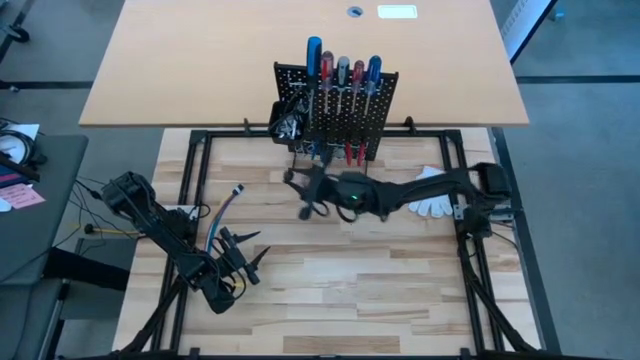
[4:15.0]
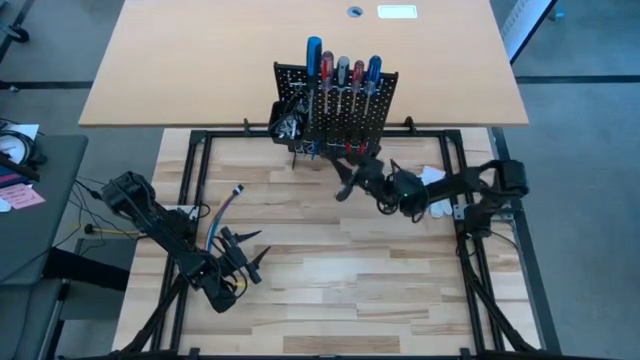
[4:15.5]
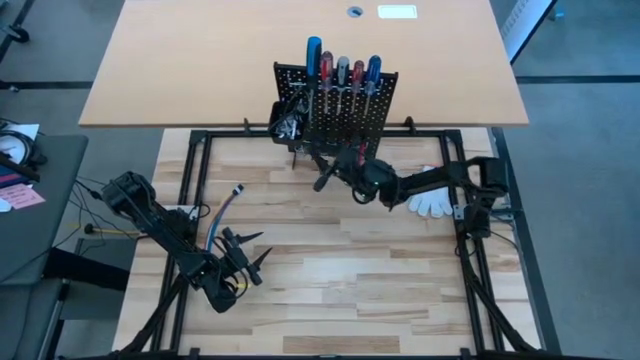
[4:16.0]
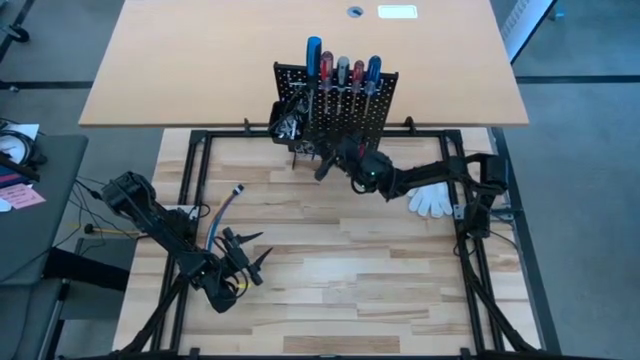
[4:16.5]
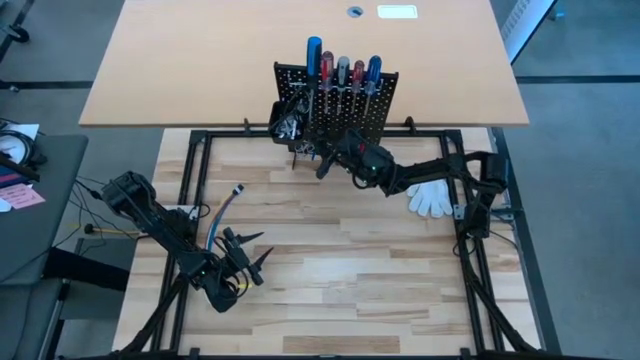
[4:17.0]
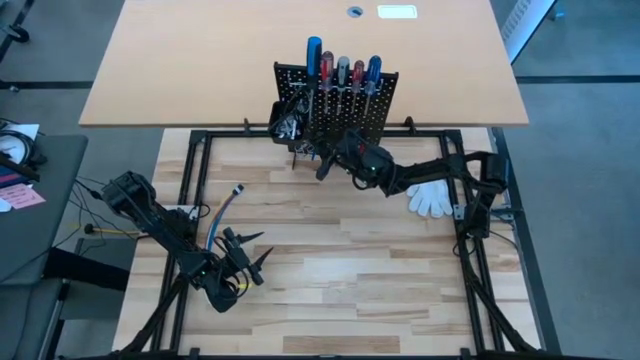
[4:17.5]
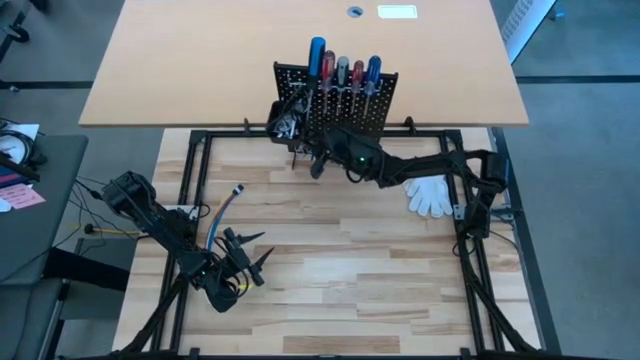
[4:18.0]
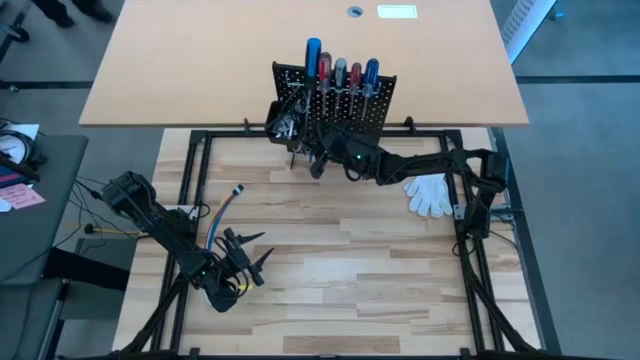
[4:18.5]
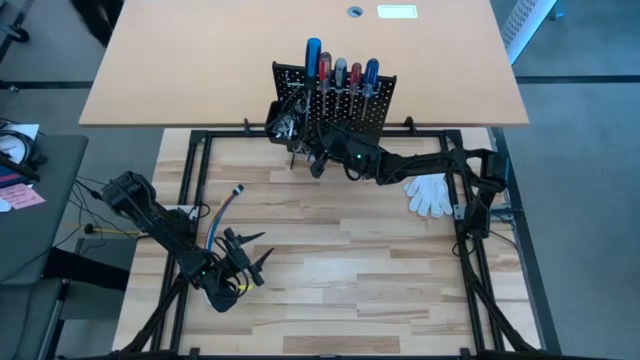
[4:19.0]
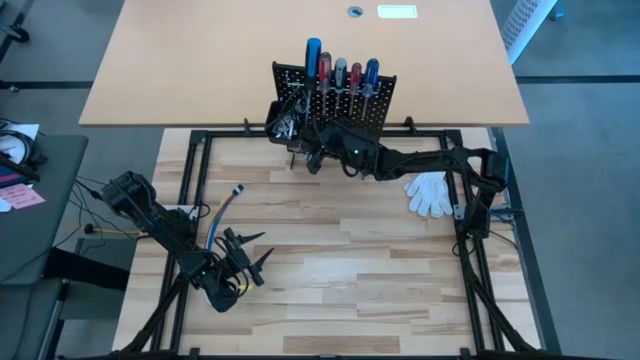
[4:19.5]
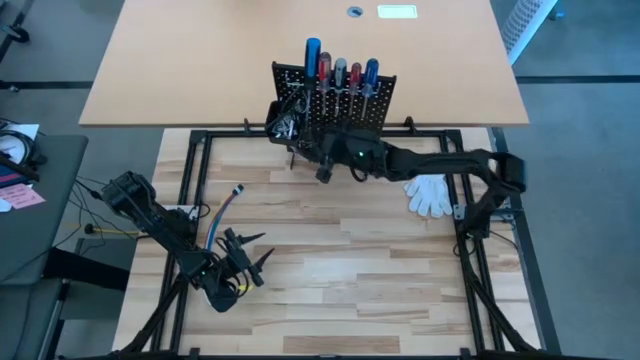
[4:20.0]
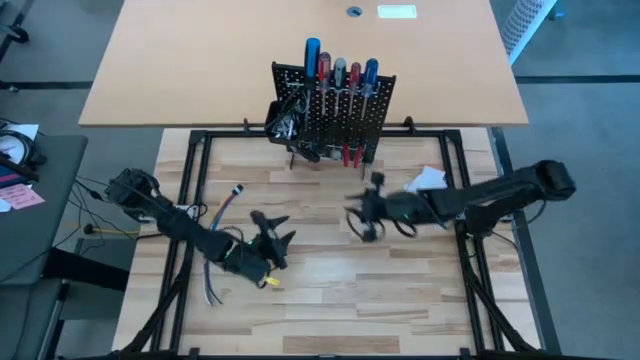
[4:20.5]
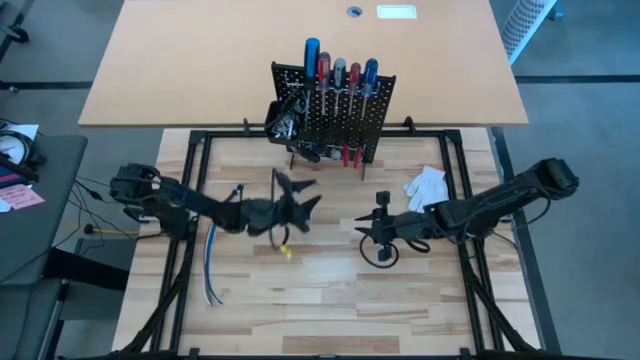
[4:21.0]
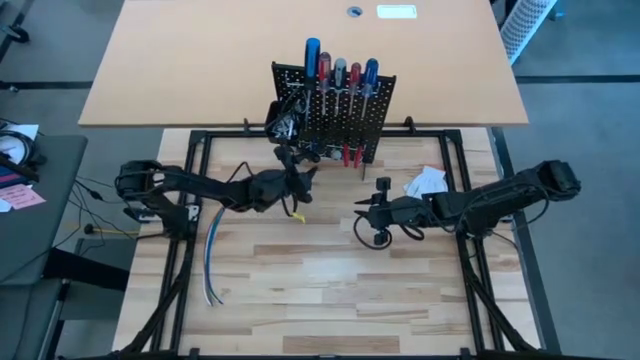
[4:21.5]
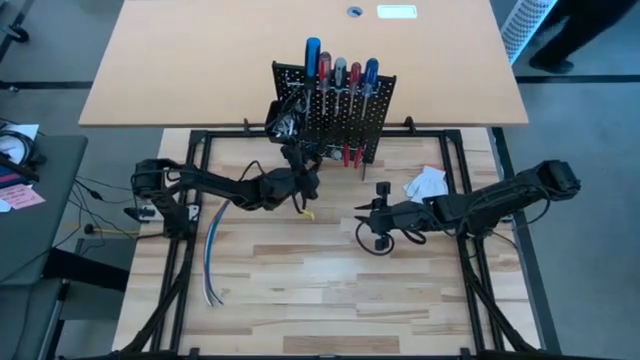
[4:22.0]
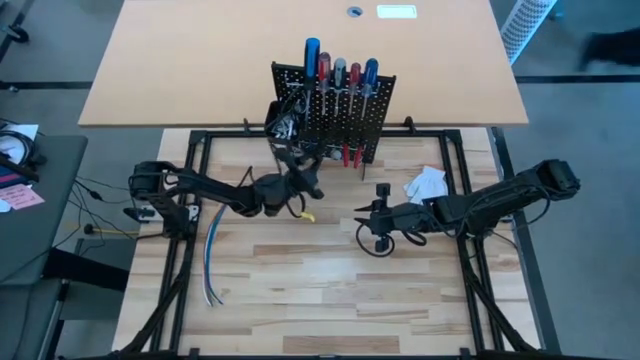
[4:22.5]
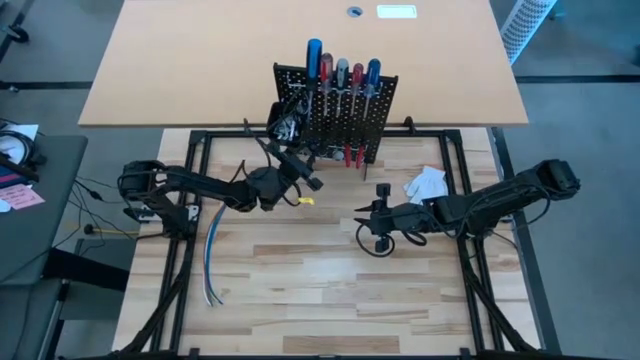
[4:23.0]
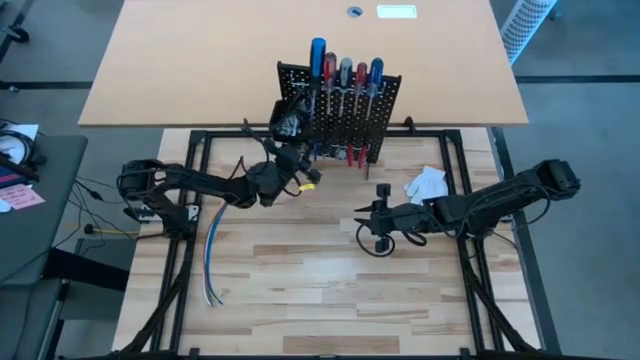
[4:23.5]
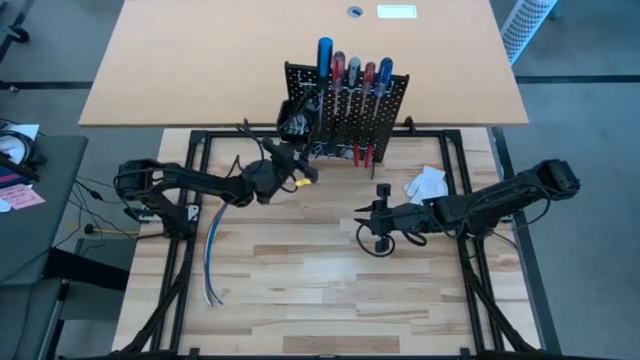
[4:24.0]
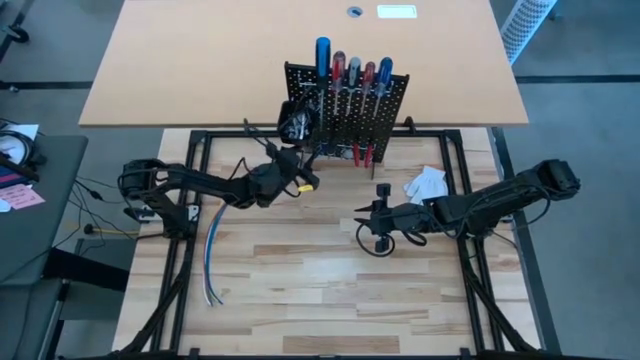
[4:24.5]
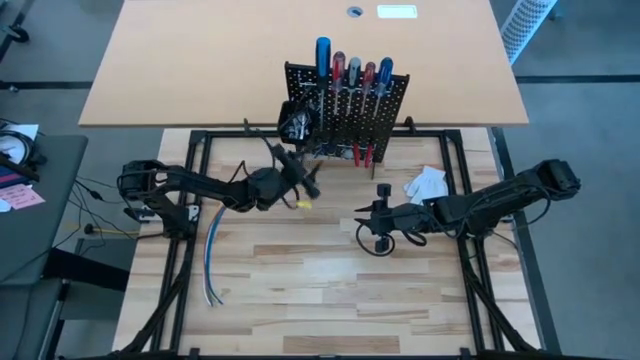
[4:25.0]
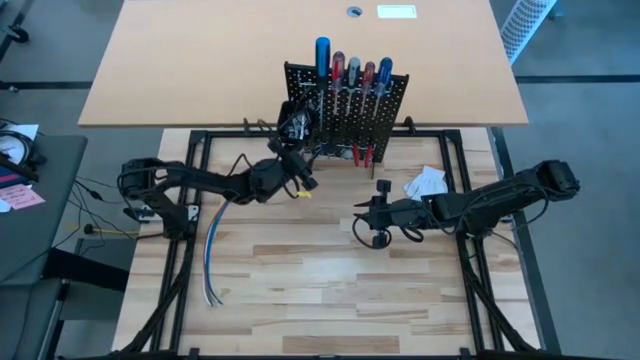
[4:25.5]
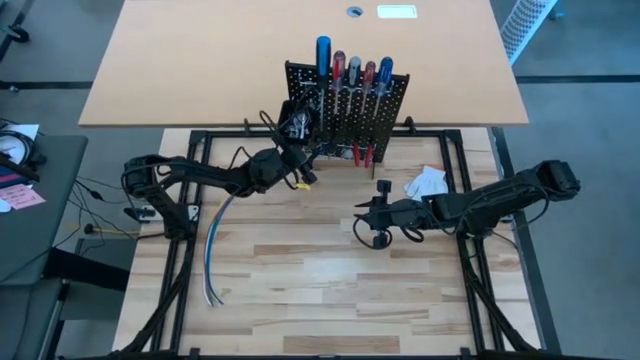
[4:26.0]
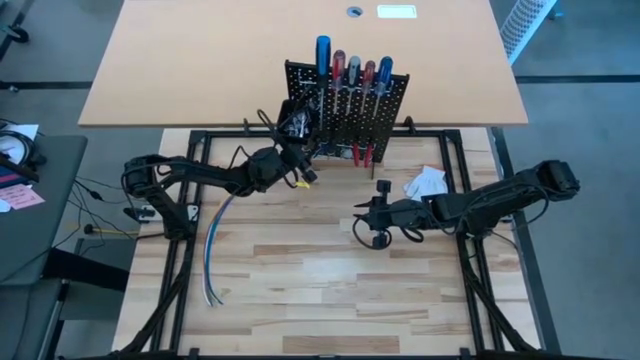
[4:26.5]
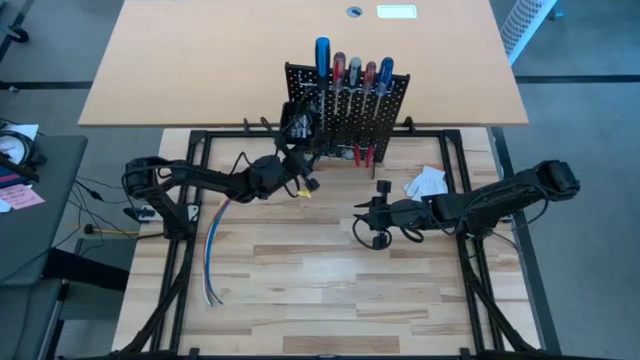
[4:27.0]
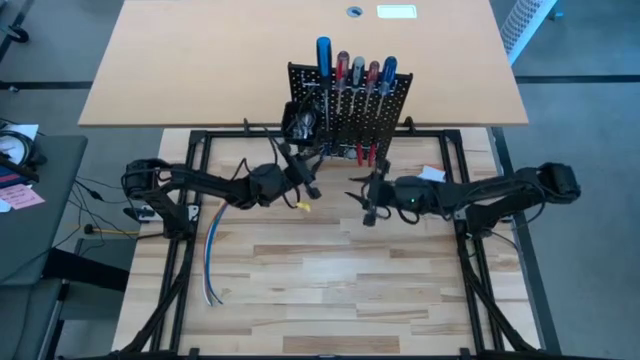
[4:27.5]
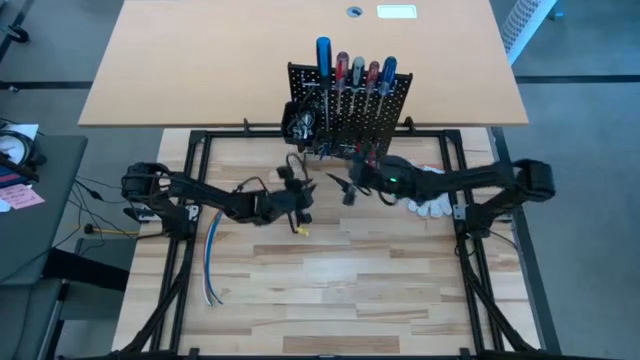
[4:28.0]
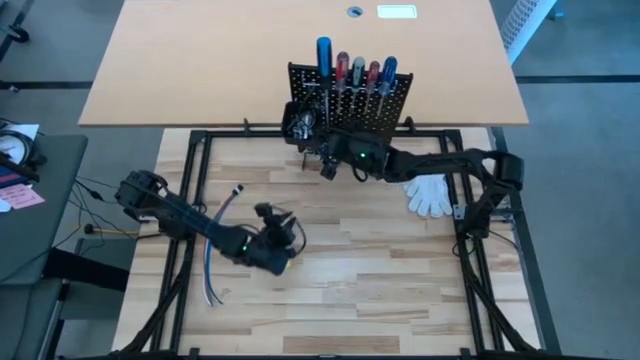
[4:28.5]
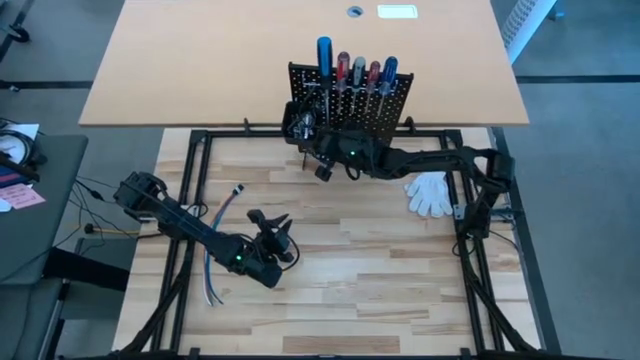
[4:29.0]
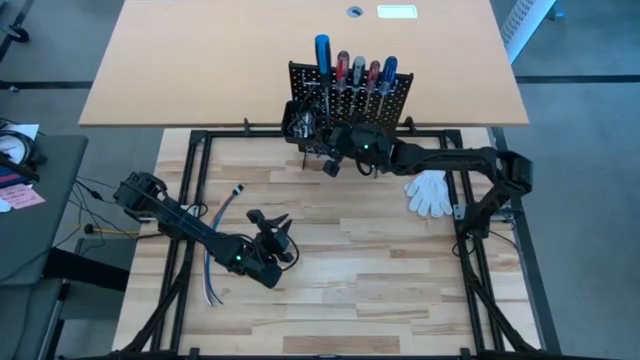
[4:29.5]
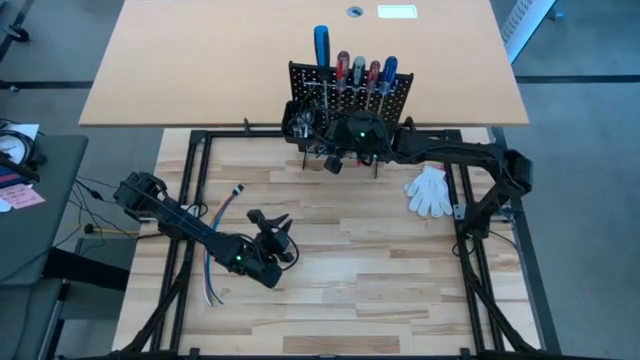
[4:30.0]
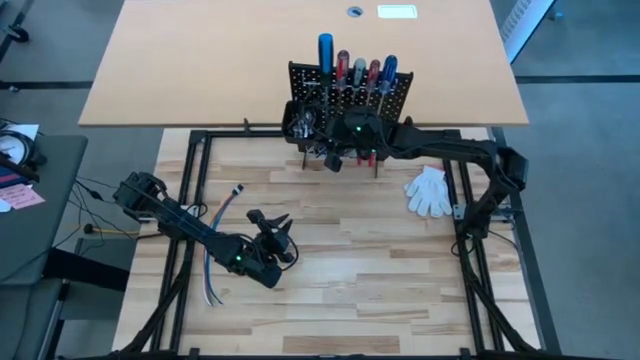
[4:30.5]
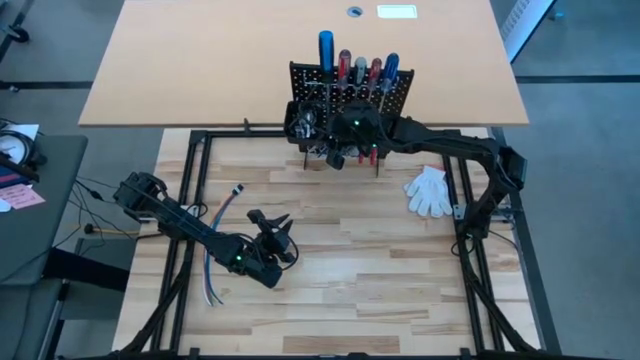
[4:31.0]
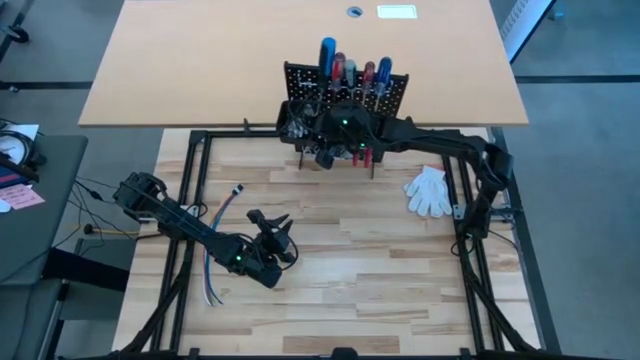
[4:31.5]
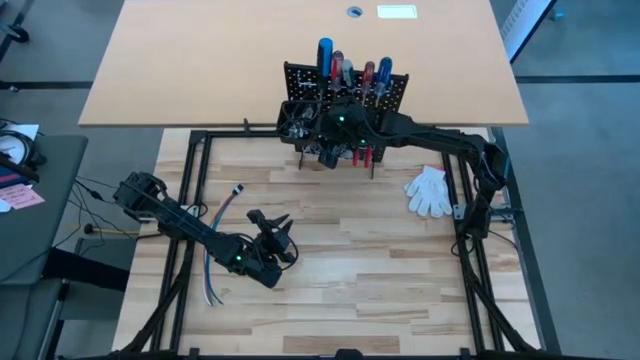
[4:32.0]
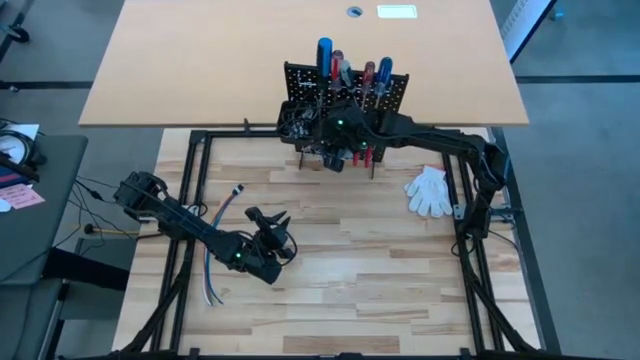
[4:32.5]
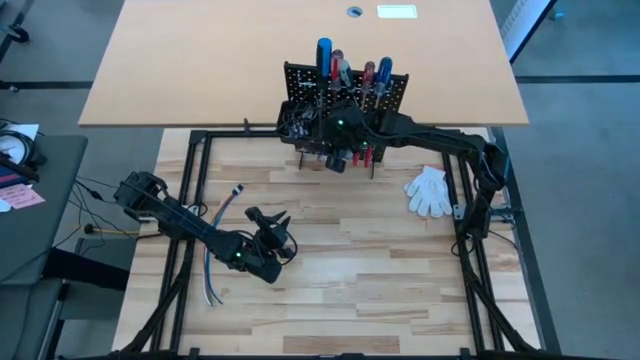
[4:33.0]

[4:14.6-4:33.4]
Task: Hang tools onto peg board
Hang the black screwdriver on the black pegboard
